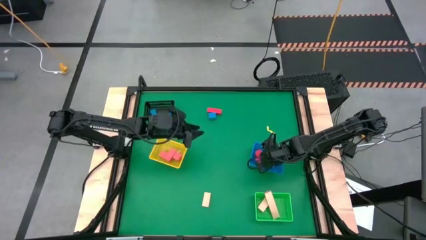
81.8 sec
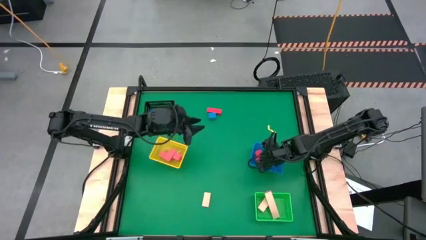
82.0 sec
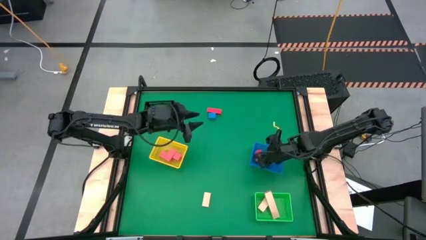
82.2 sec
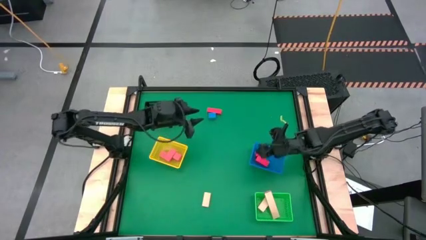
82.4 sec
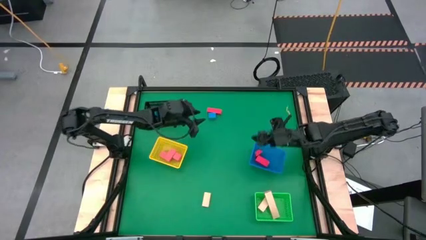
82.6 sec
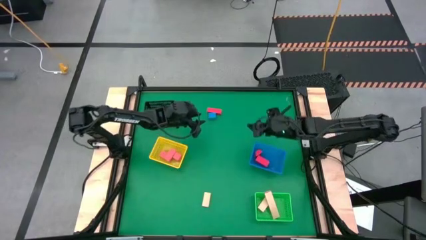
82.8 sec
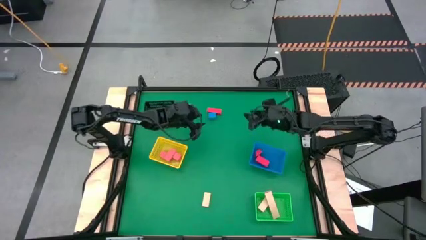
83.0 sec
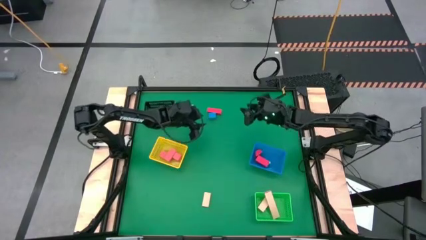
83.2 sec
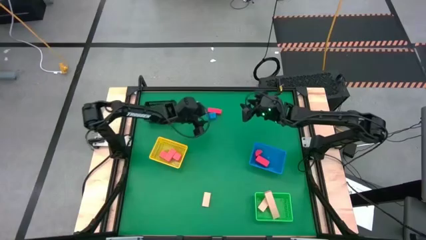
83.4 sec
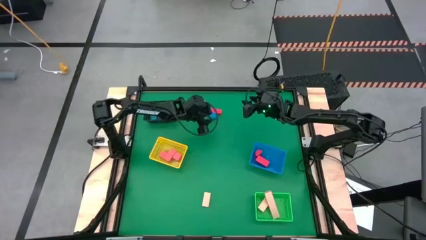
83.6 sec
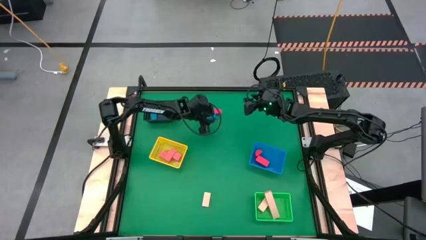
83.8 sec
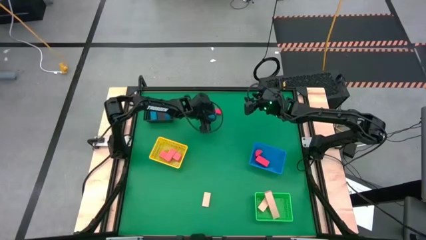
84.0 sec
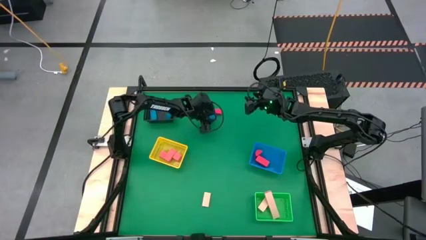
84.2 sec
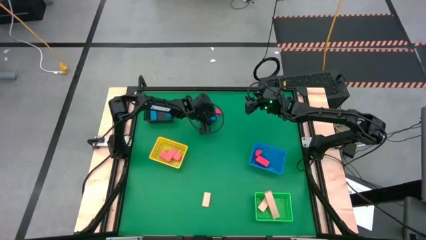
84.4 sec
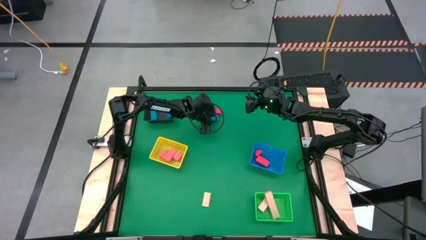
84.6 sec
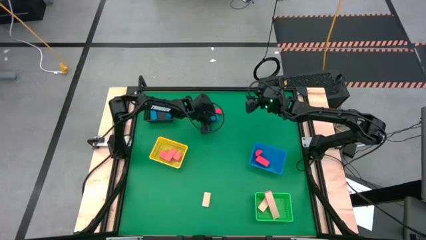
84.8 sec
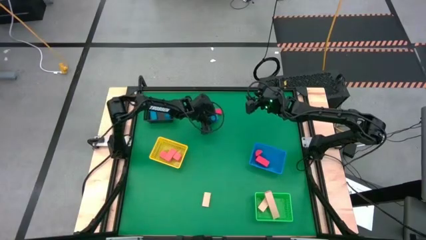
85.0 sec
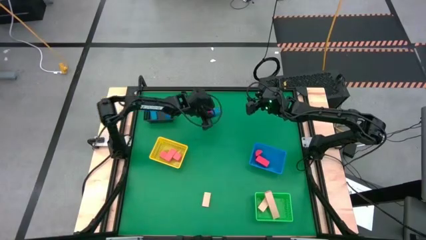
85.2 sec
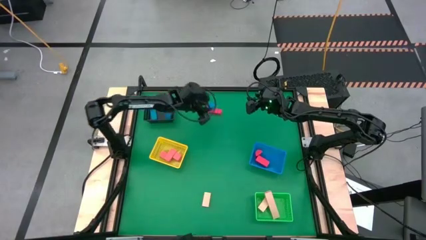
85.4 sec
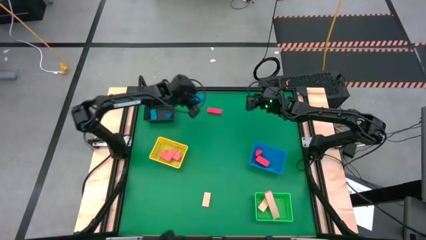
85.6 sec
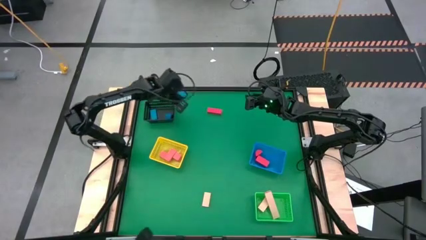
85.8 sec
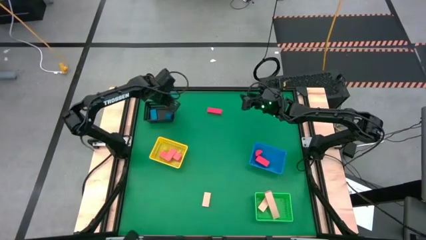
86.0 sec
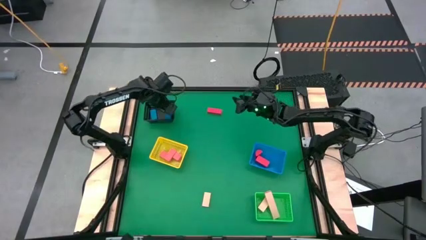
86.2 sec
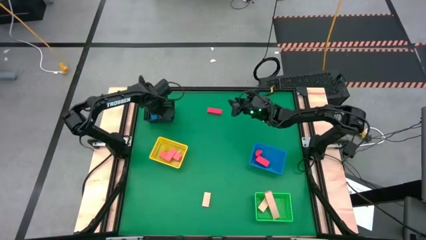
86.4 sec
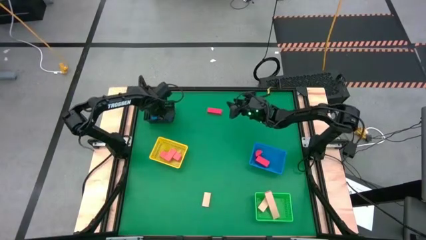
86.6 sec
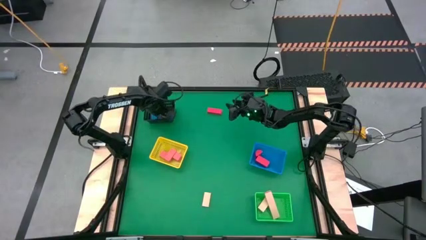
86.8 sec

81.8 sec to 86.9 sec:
Task: Sort & place blocks by color
Put the blue square block into the black basket

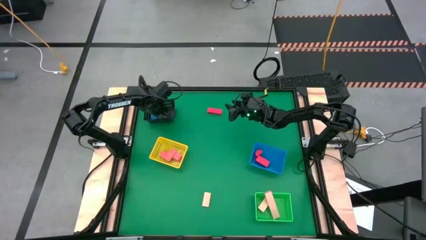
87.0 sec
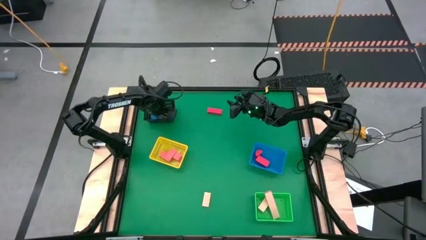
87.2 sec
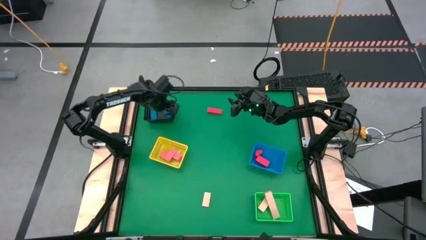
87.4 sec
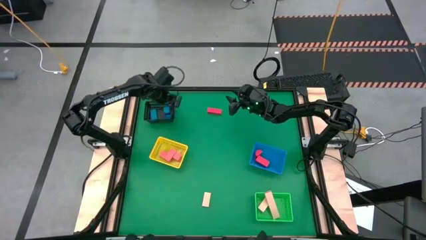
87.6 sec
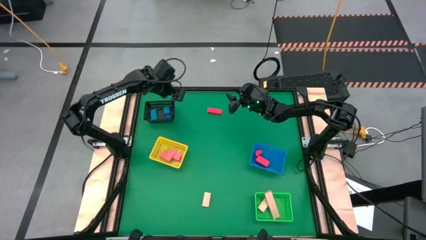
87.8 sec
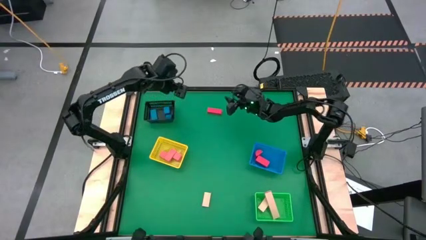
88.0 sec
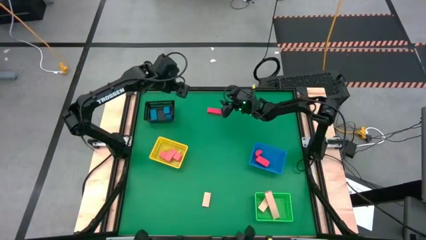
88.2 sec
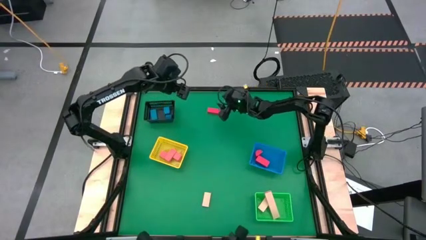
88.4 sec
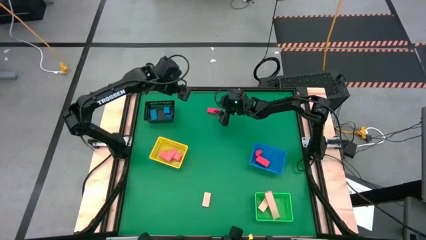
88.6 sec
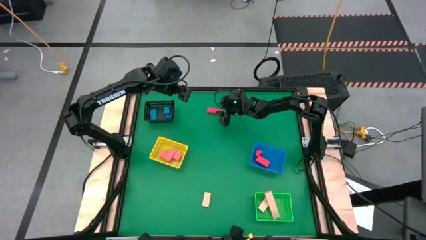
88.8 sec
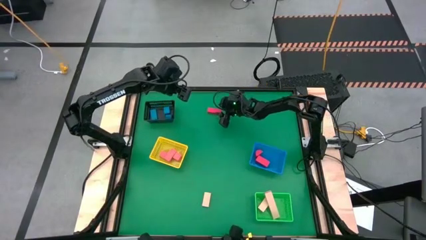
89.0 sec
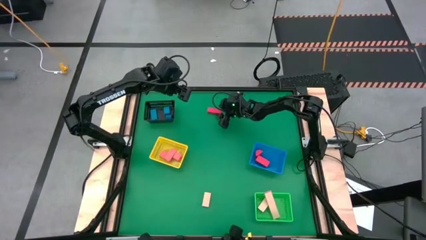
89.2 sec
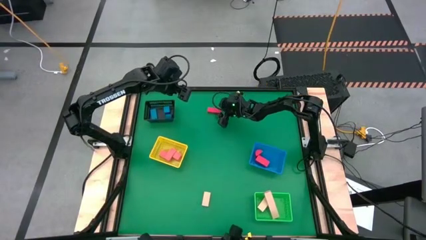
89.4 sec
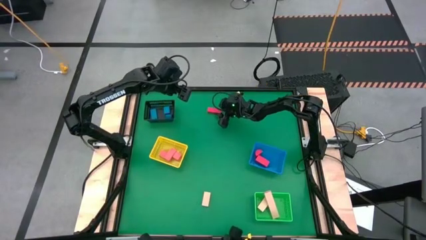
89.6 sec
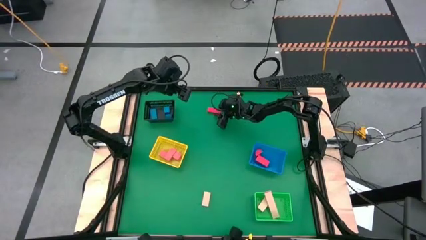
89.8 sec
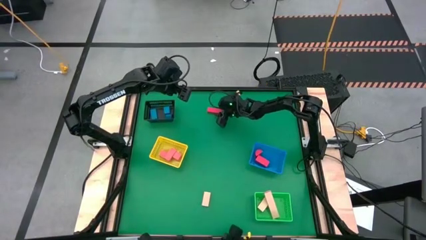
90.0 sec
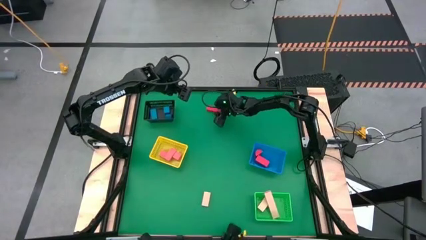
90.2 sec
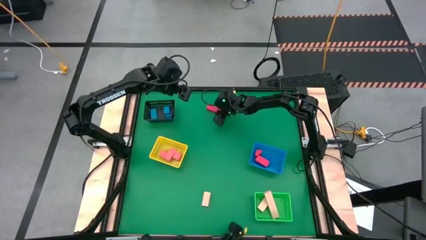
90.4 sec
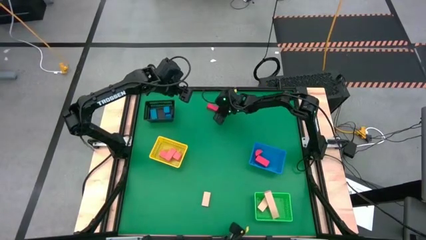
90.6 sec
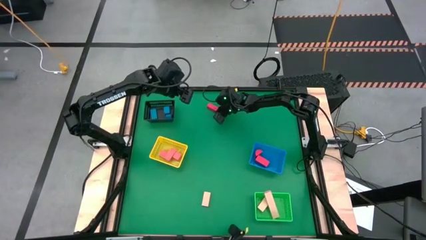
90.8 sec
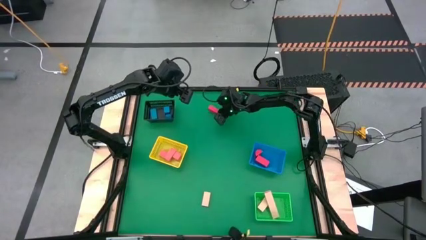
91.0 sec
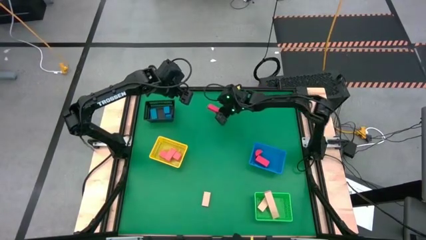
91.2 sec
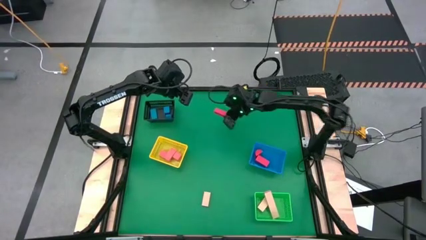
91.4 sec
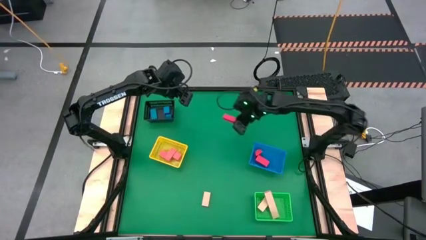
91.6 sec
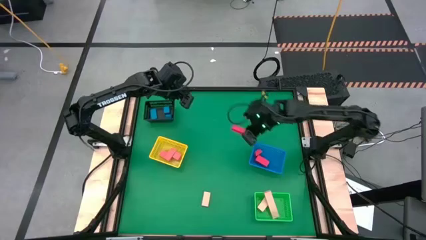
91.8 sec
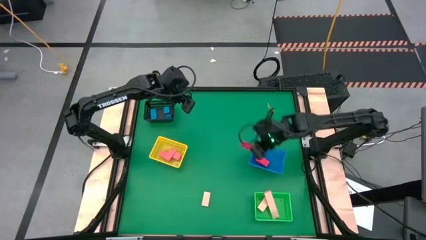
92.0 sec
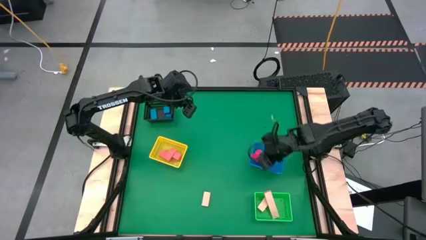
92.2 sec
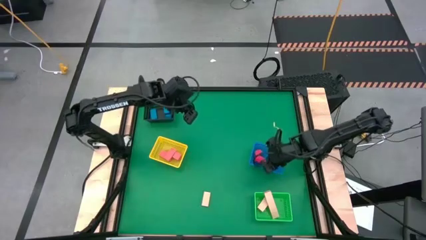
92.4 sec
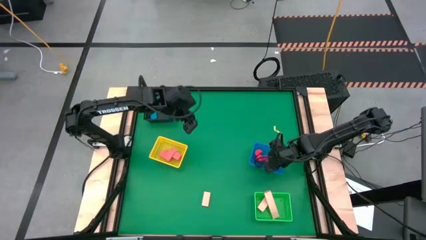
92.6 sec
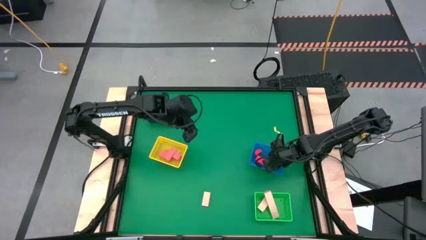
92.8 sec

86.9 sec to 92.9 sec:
Put the red rectangular block into the blue basket
